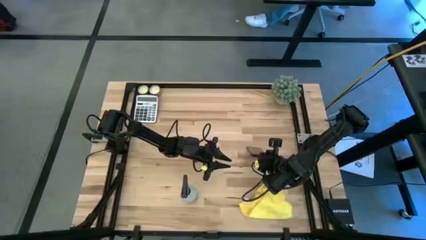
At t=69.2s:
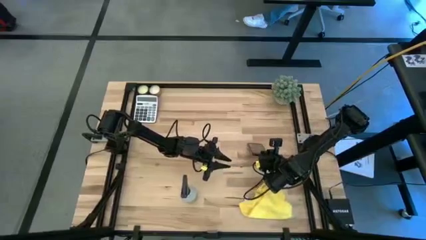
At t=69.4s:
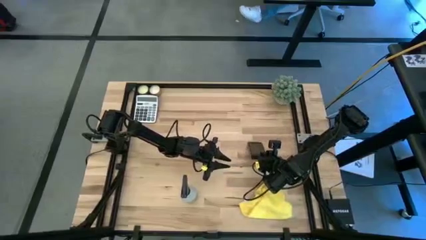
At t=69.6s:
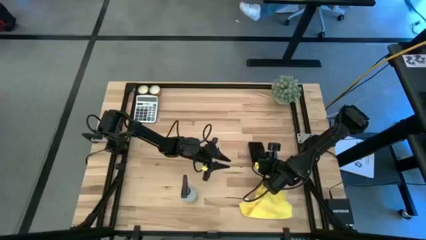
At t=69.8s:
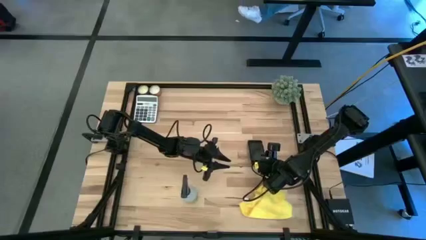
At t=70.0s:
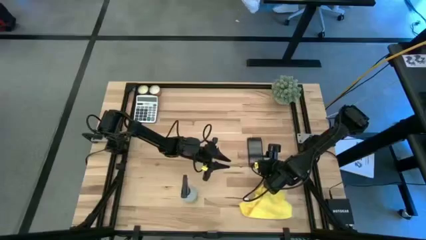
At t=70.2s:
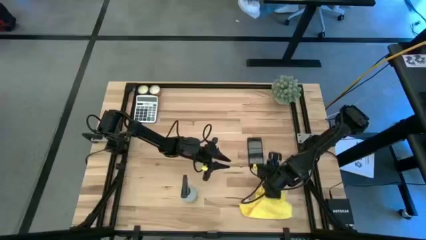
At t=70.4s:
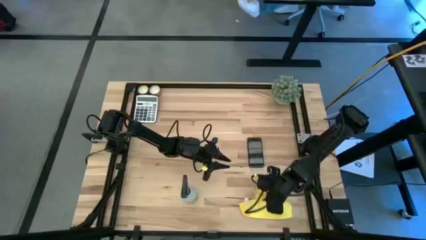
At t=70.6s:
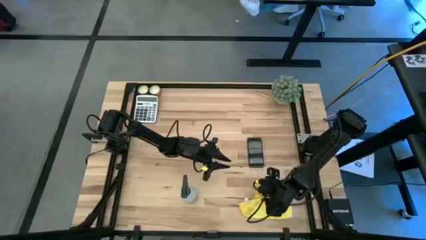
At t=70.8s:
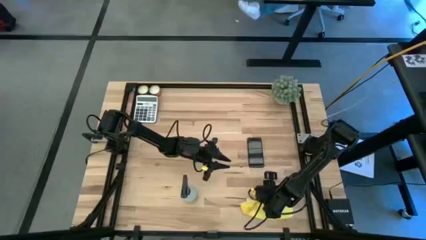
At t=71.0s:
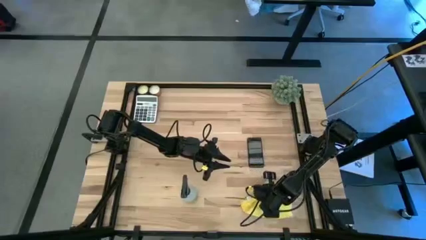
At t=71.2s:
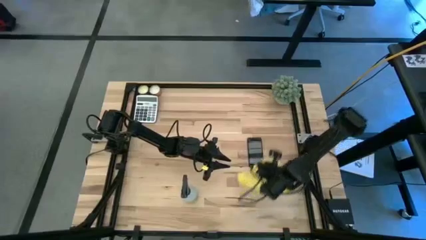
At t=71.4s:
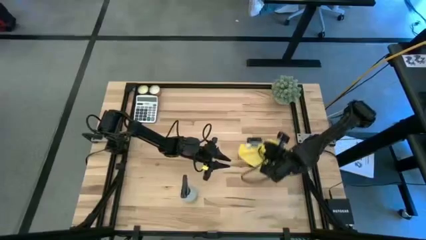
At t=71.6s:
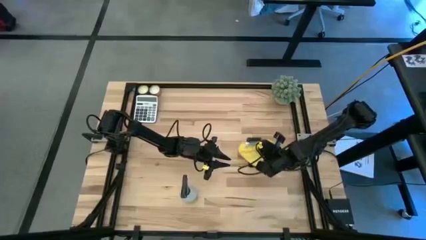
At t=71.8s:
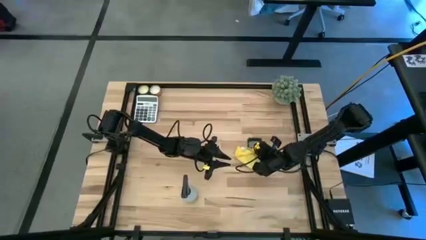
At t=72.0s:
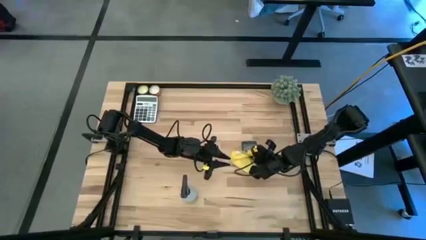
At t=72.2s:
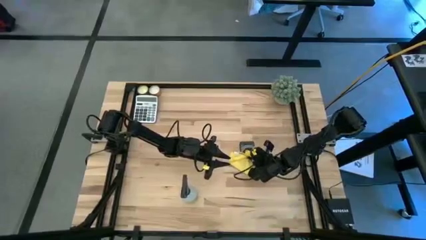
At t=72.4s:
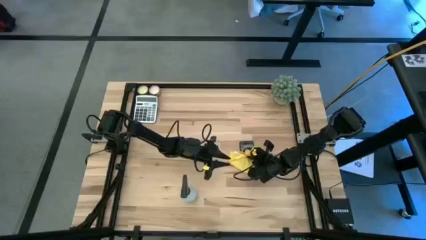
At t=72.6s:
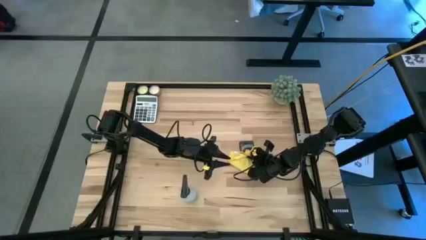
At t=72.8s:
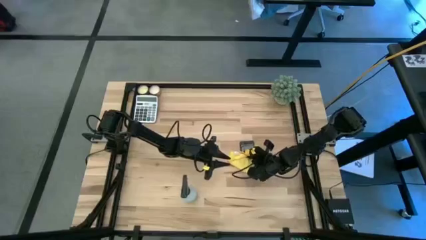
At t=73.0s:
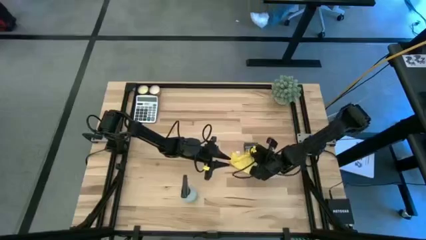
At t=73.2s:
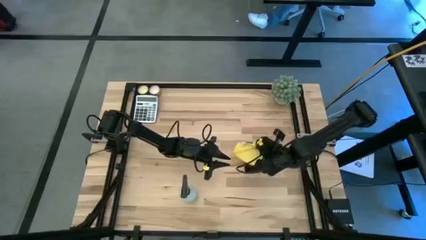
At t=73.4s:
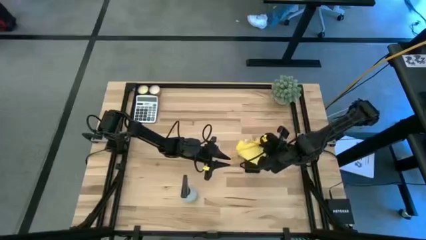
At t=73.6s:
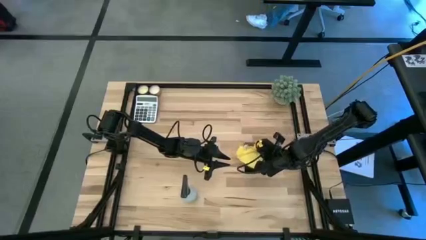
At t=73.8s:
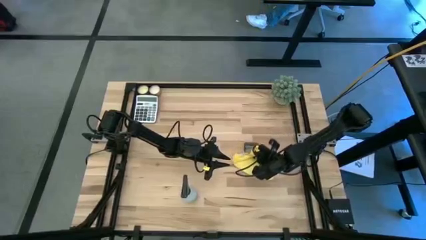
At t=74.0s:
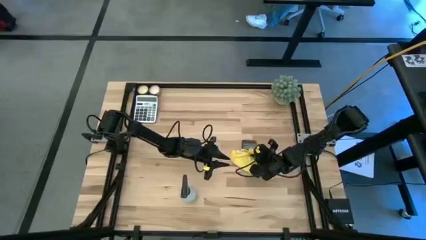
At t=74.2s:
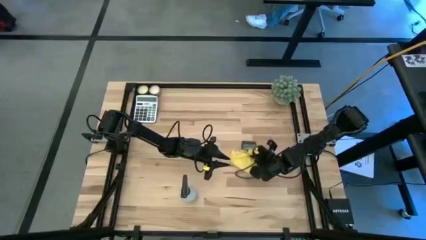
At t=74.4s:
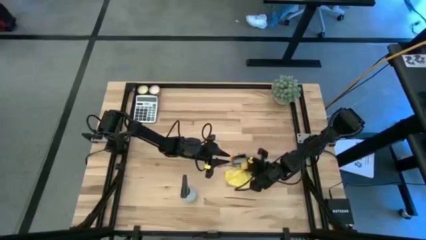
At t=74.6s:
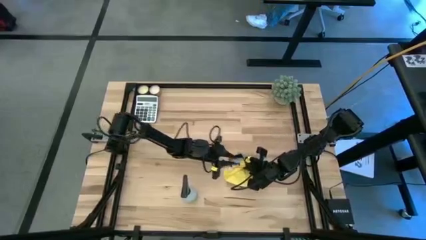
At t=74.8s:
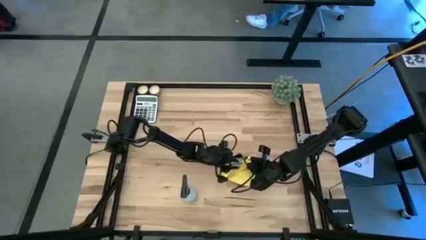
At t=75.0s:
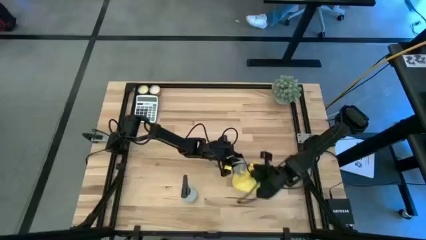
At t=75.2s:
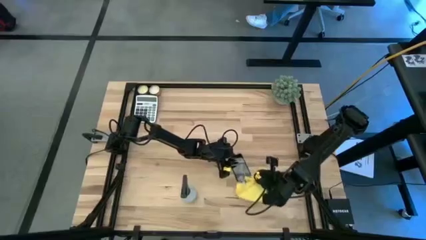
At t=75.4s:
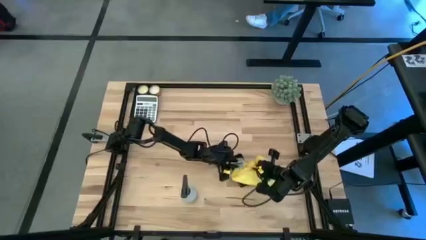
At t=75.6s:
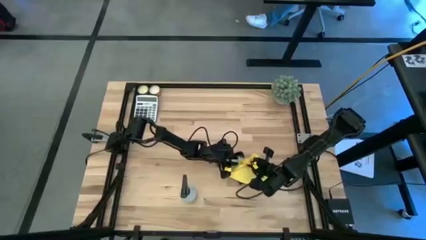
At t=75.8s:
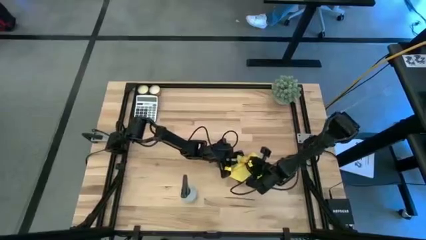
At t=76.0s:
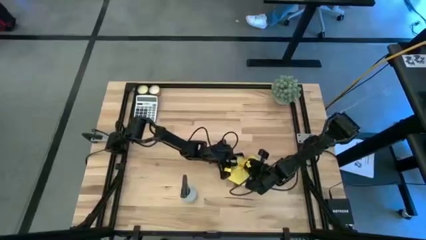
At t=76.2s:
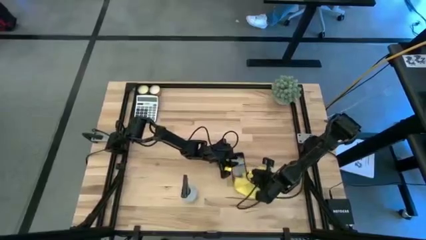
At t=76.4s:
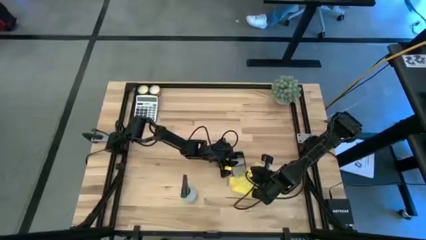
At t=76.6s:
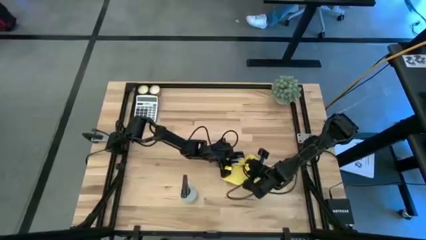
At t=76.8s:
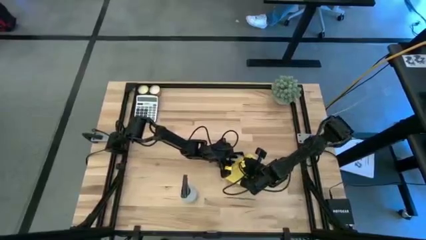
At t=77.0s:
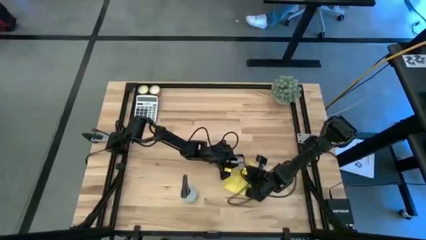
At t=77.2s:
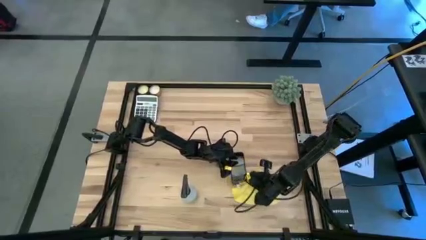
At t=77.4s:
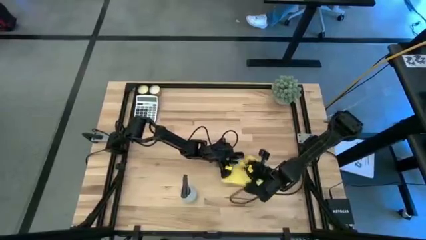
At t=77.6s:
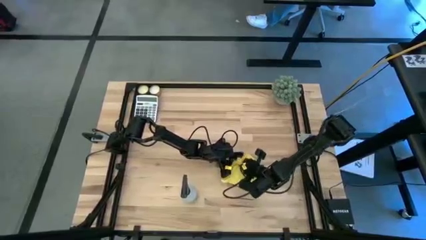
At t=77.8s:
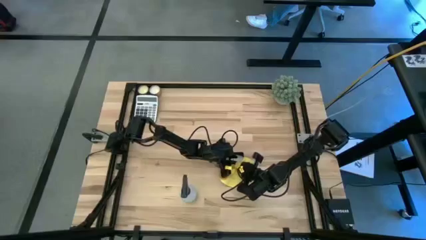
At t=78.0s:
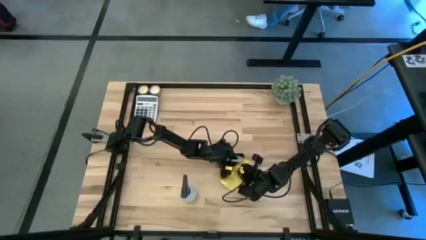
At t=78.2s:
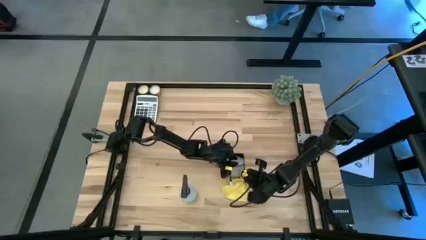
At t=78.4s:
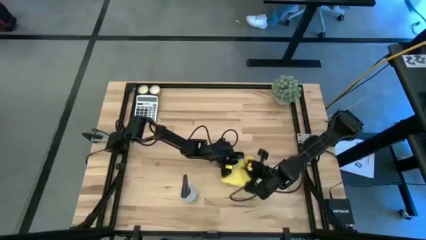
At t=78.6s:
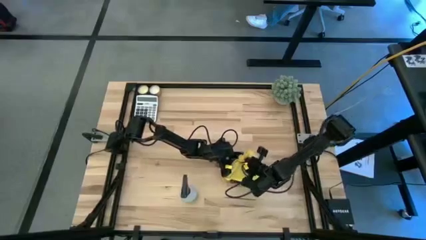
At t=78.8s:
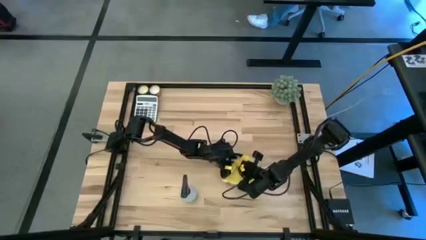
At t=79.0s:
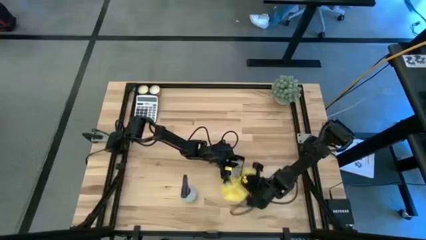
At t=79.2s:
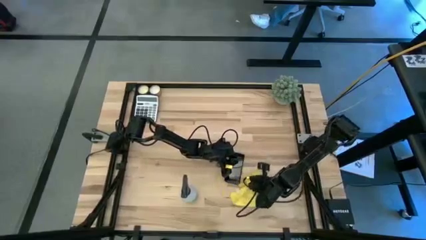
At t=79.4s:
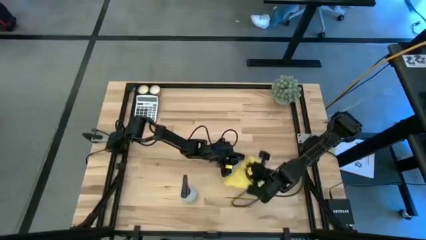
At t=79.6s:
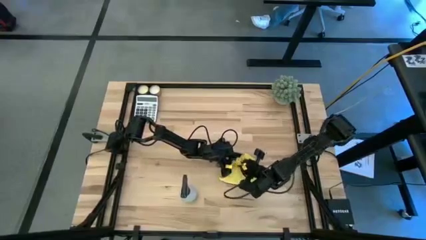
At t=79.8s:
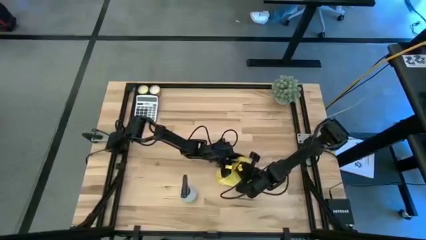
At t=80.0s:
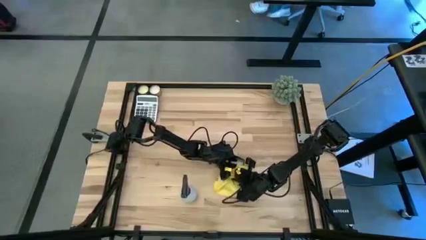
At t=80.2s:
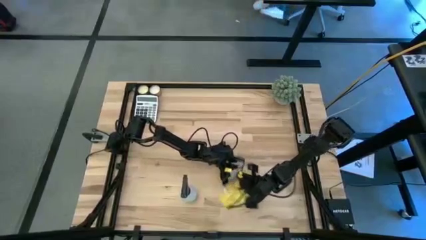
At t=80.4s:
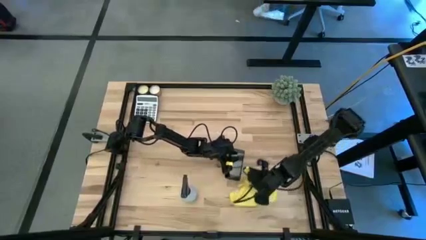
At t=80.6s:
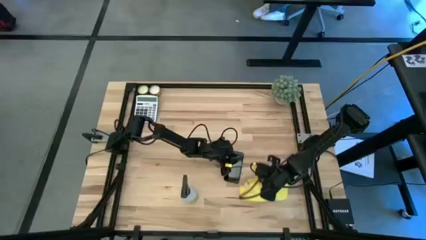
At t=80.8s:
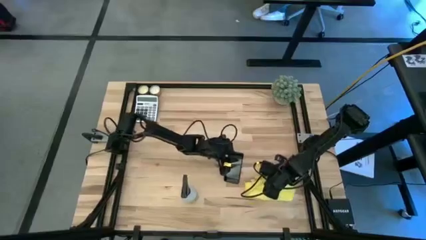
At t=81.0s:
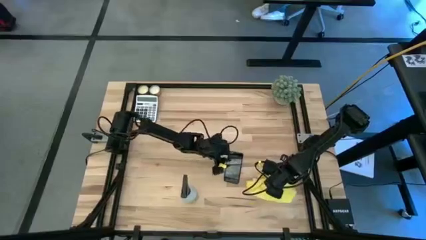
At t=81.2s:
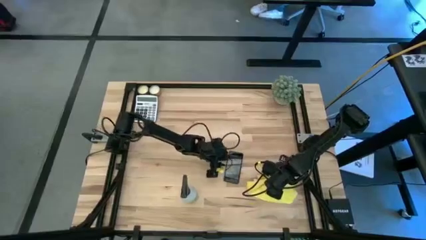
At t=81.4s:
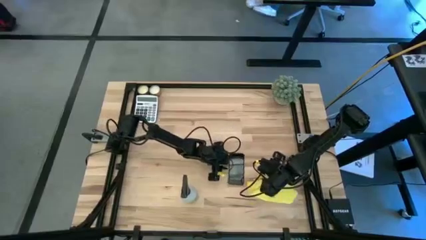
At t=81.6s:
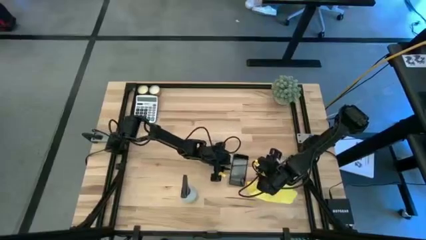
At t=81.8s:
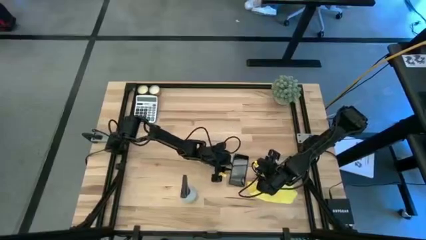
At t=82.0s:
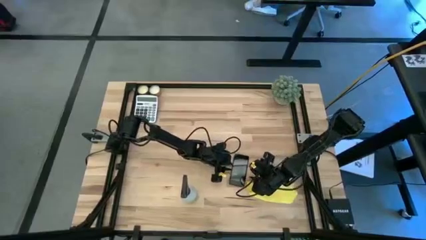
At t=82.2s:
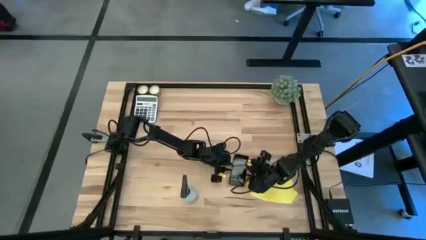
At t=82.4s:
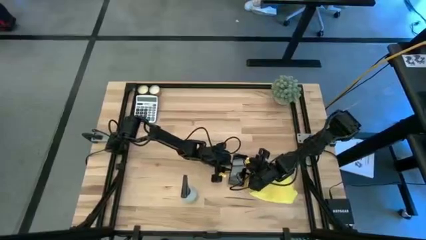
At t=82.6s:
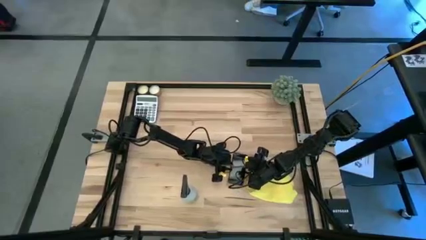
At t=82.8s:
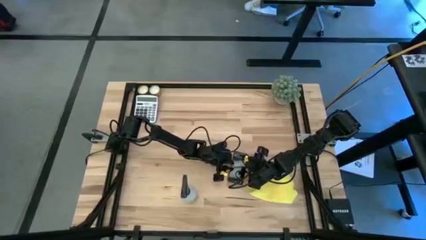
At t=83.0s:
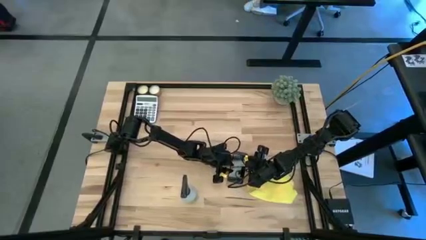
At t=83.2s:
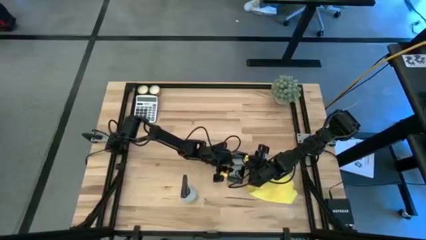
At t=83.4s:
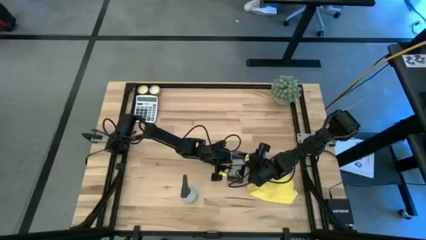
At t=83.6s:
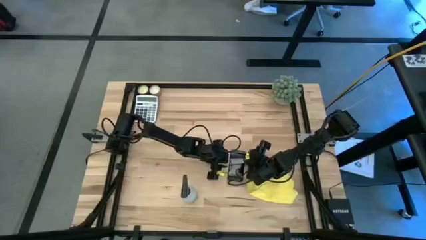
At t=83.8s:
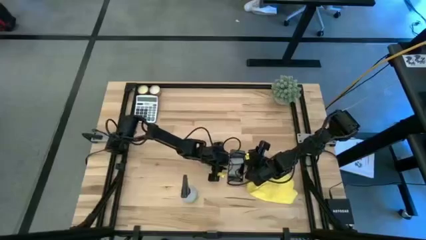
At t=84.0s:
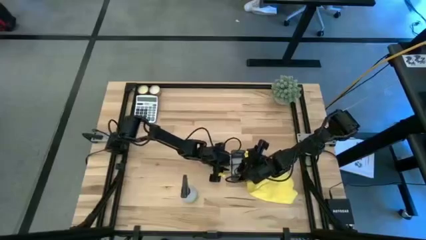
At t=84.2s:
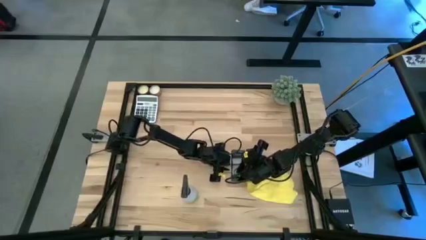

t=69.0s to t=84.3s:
Task: Apply microfiber cloth
Wipe the black cellphone with the yellow microfiber cloth
